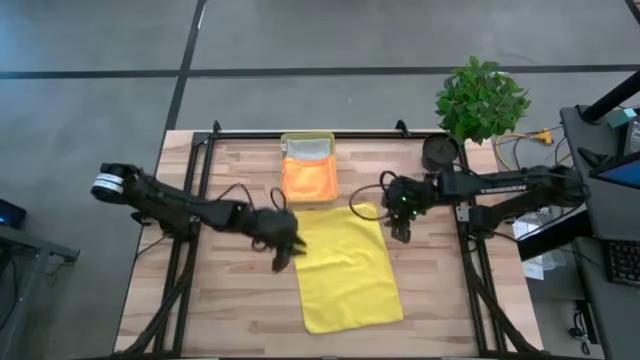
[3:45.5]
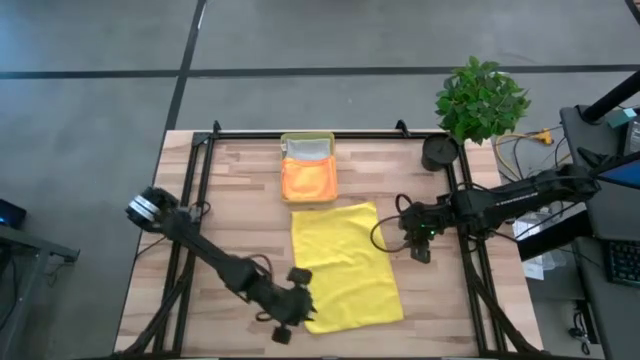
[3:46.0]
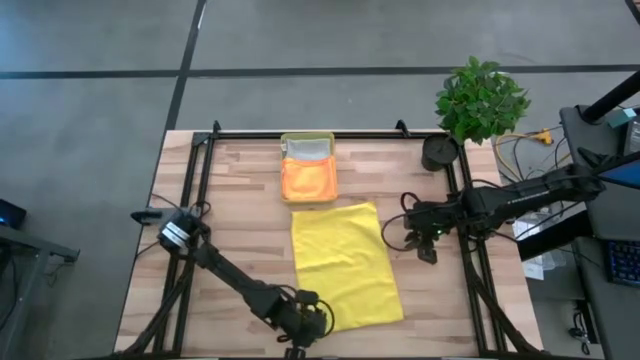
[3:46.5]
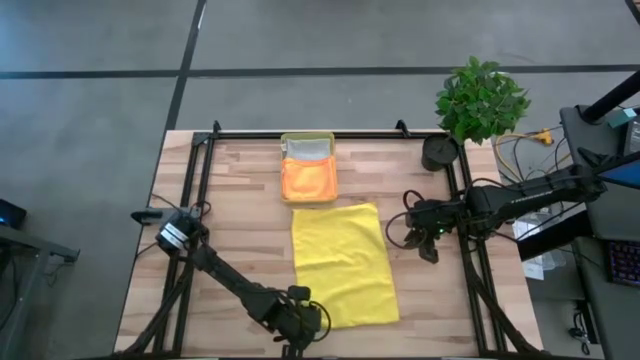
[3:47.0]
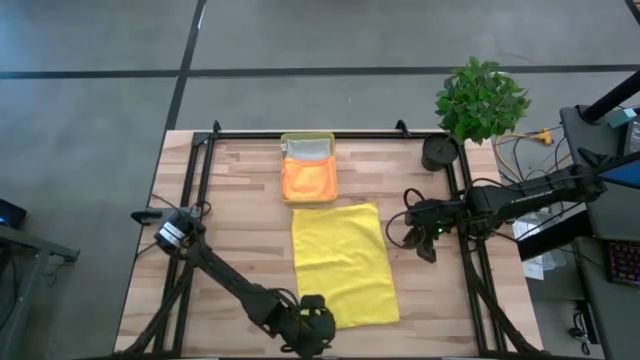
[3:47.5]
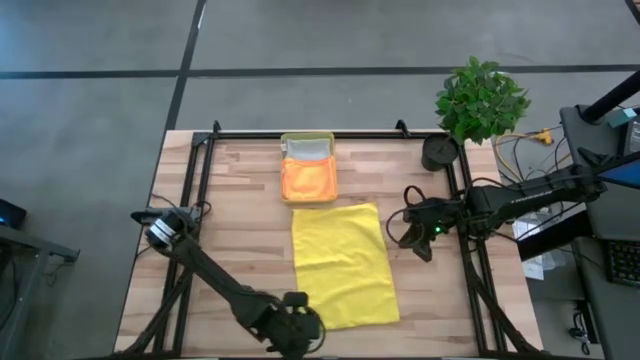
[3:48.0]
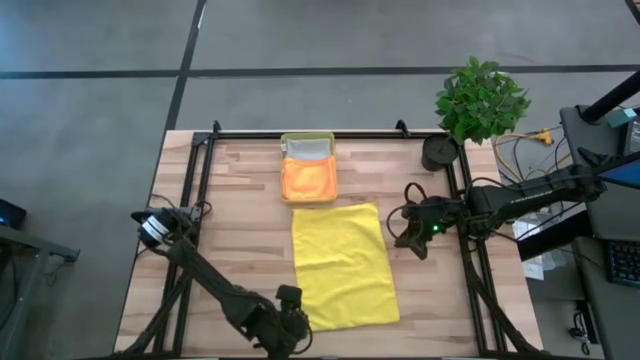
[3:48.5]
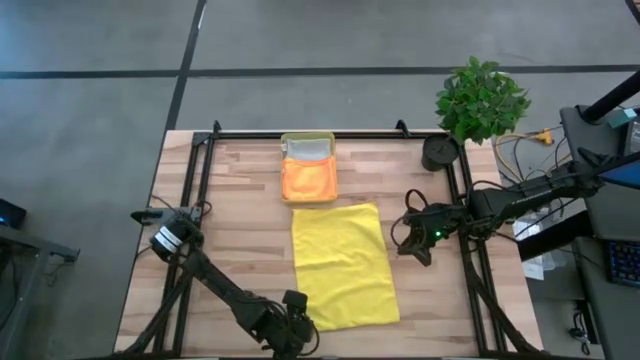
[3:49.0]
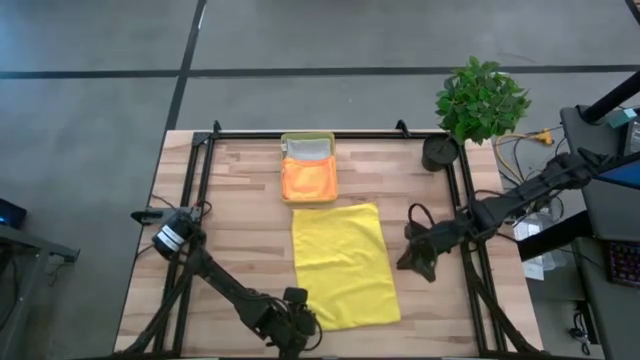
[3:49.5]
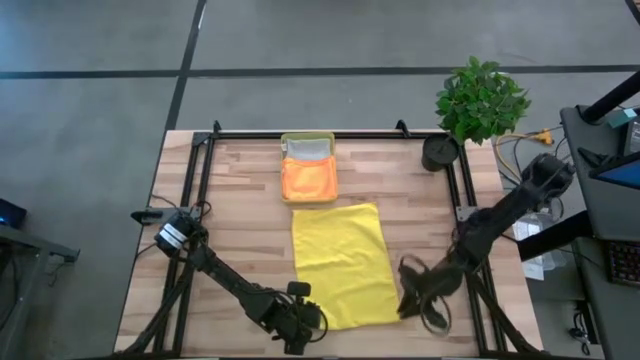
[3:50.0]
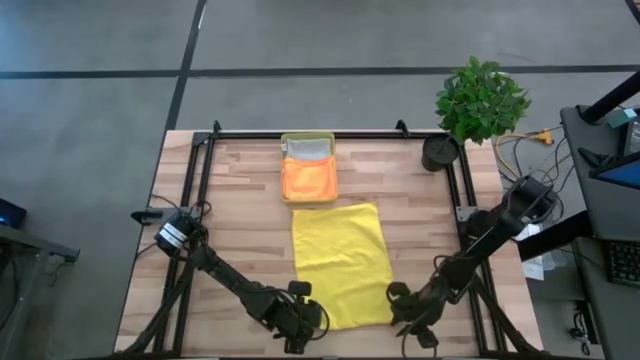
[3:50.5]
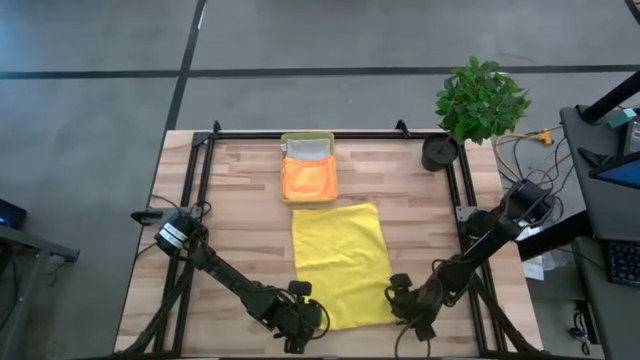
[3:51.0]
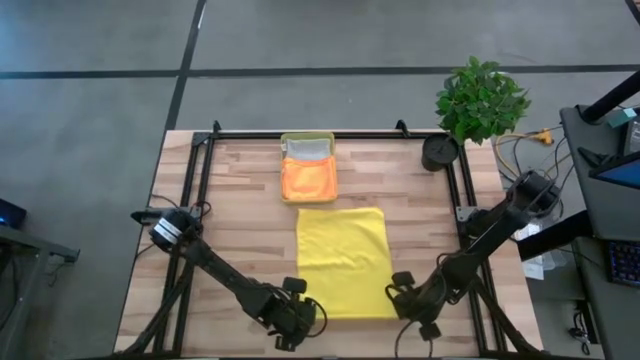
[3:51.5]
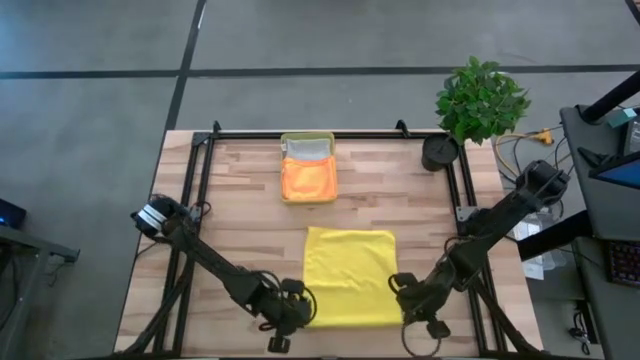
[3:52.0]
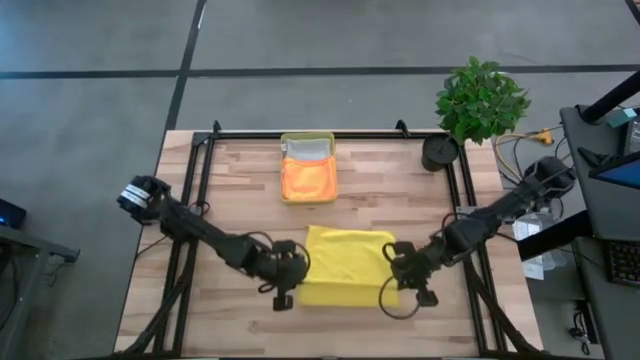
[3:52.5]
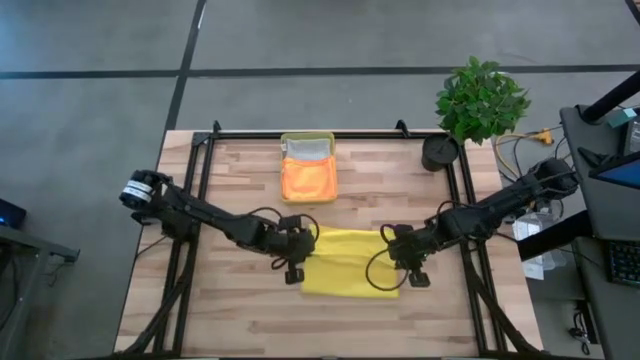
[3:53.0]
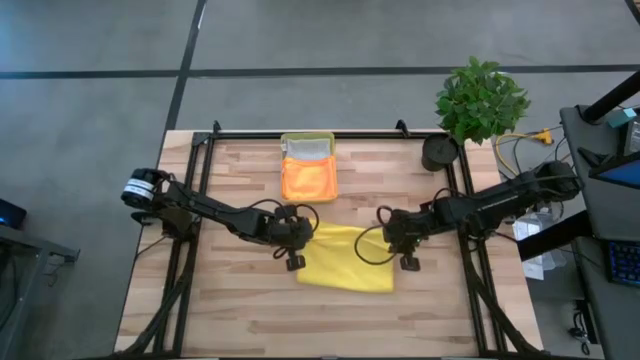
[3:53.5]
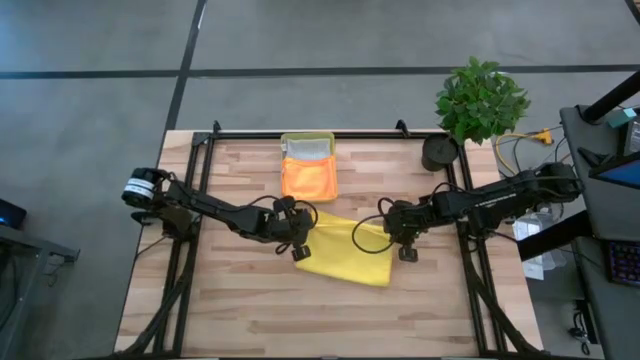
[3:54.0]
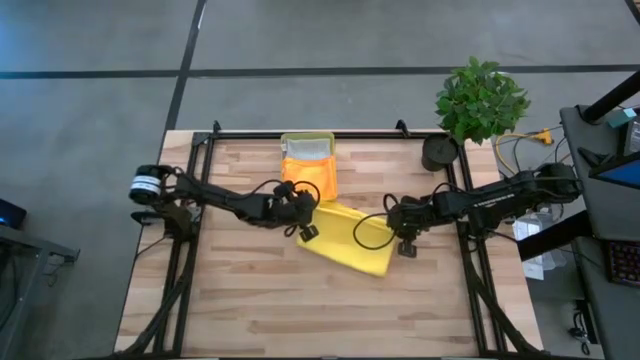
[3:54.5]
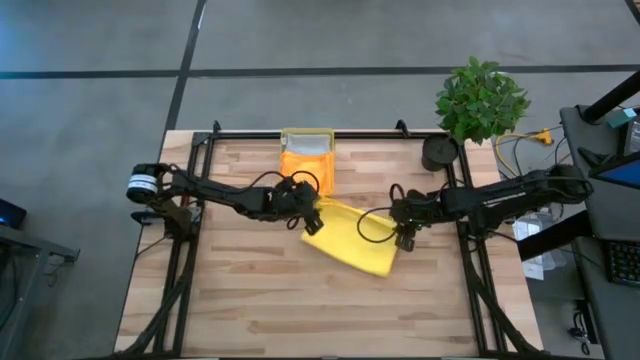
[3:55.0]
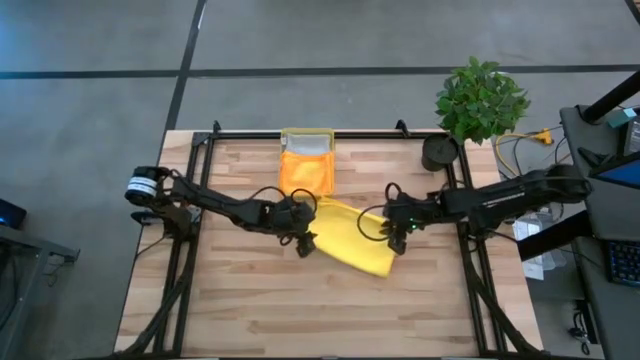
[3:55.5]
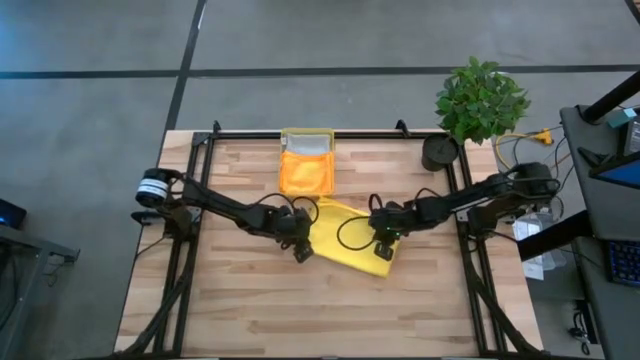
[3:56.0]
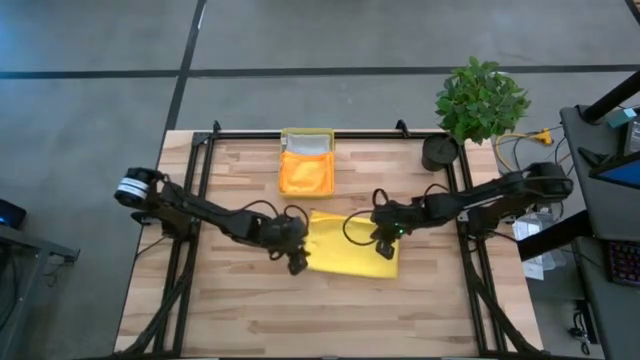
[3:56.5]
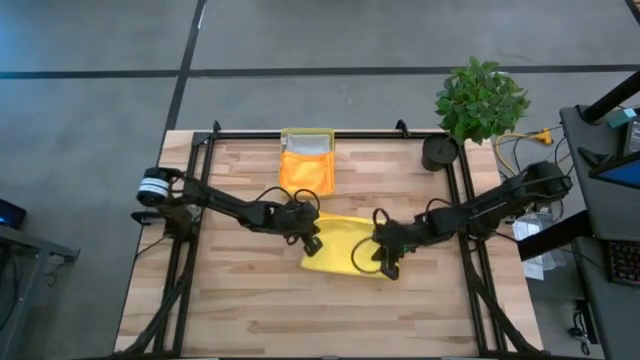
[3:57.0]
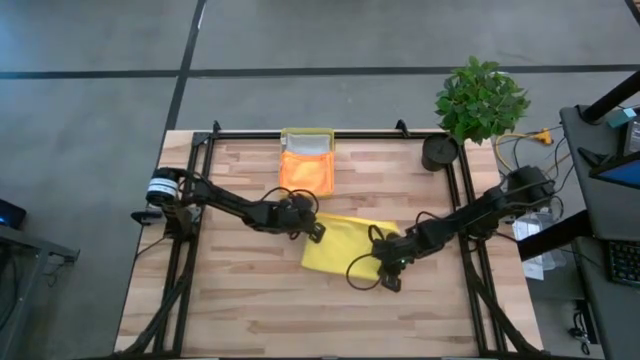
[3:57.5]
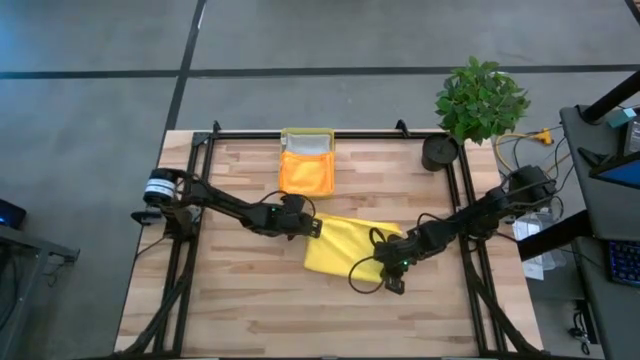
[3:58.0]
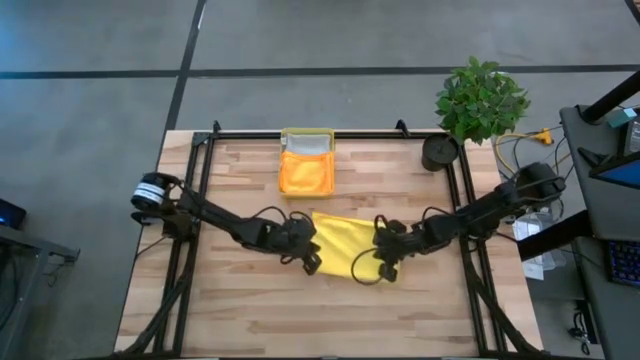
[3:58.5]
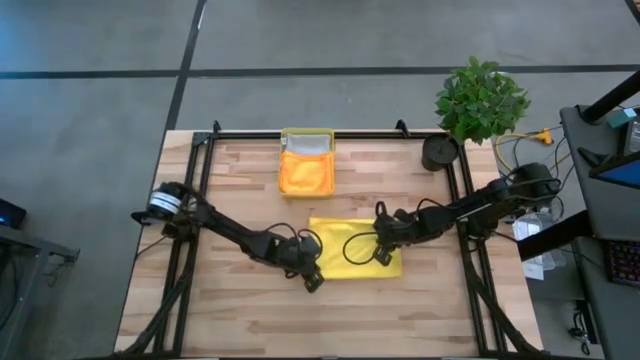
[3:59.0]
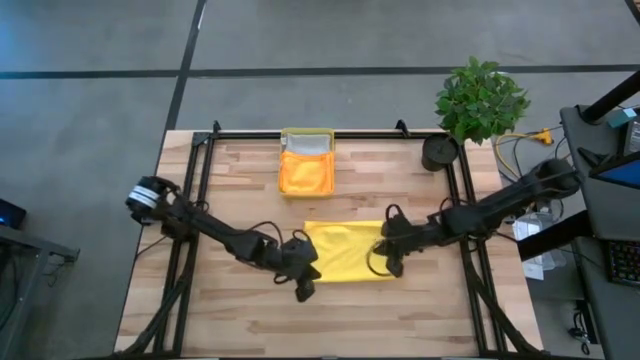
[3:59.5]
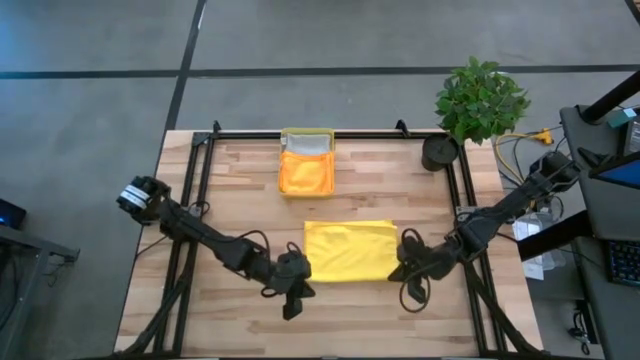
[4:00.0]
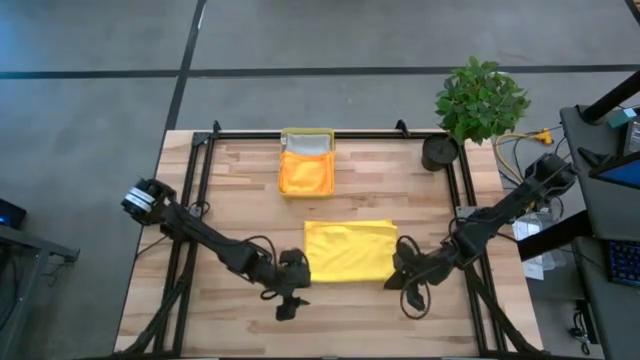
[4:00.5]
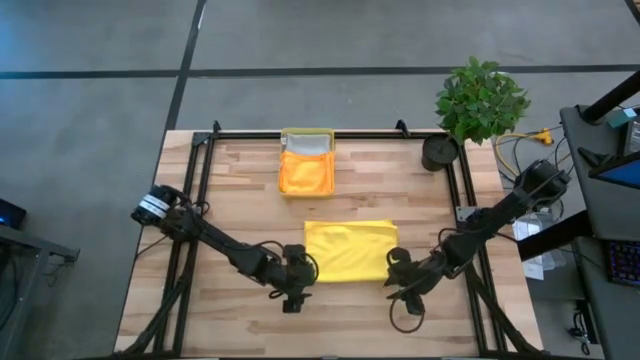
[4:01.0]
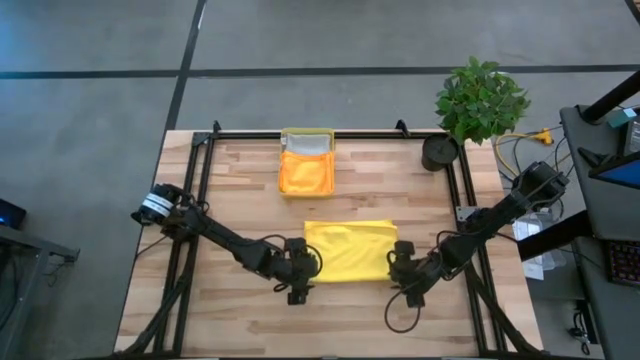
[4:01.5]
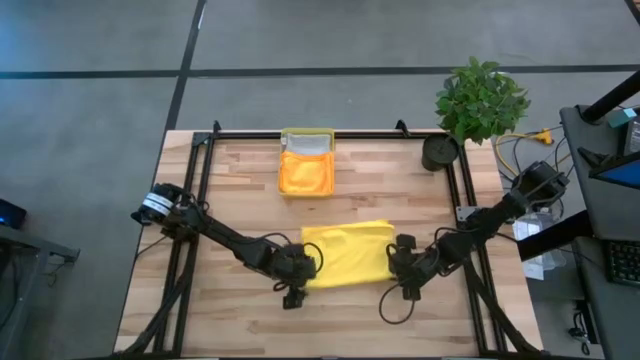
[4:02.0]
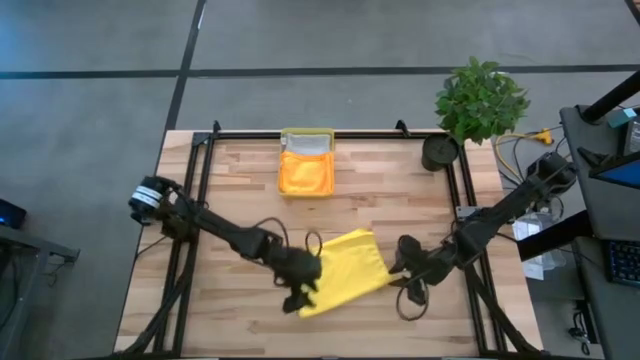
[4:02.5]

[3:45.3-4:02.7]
Task: Fold microfiber towels
Fold the yellow microfiber cloth

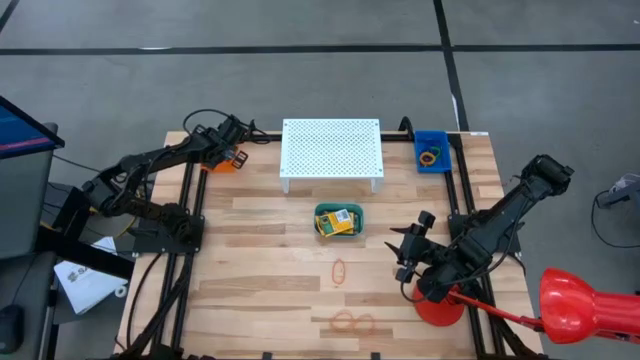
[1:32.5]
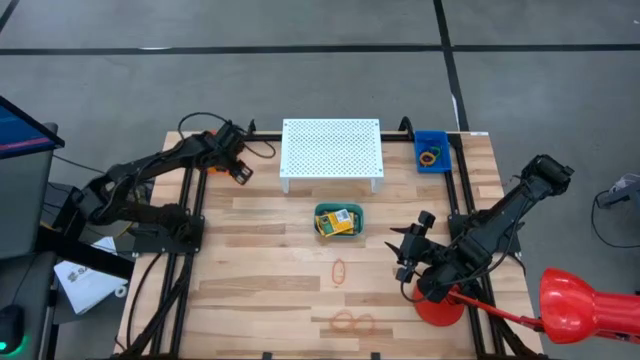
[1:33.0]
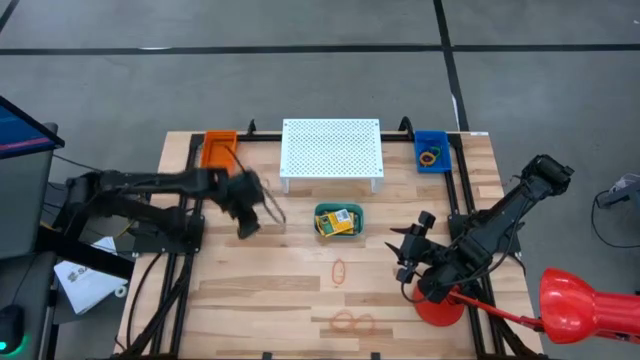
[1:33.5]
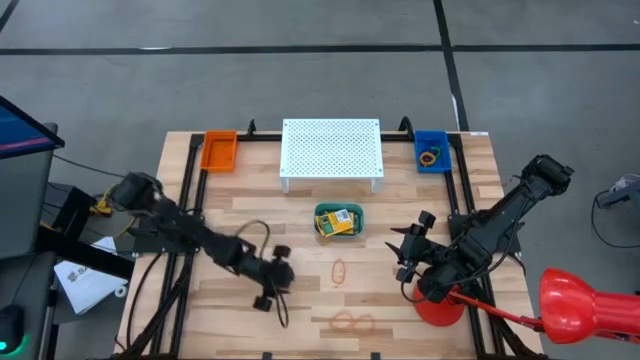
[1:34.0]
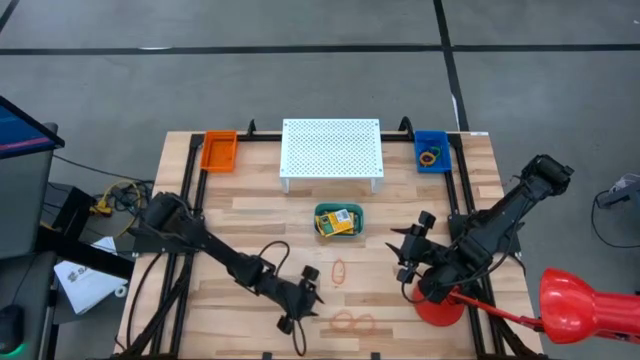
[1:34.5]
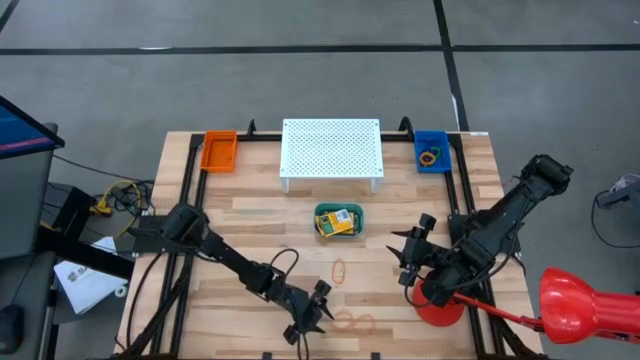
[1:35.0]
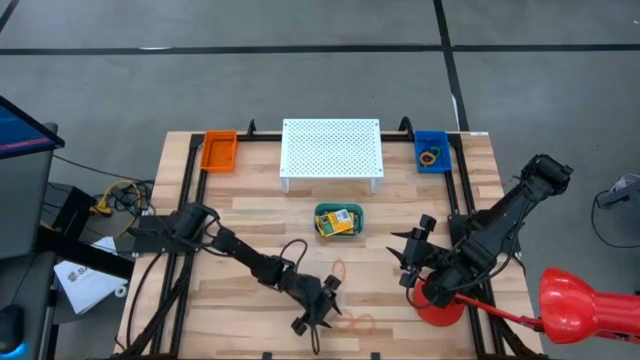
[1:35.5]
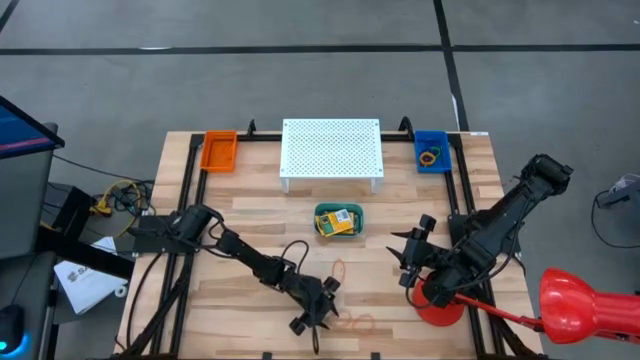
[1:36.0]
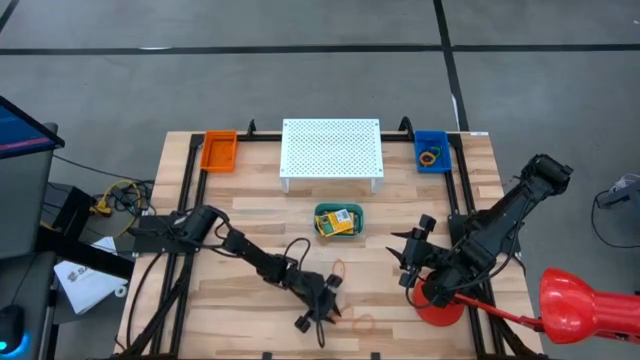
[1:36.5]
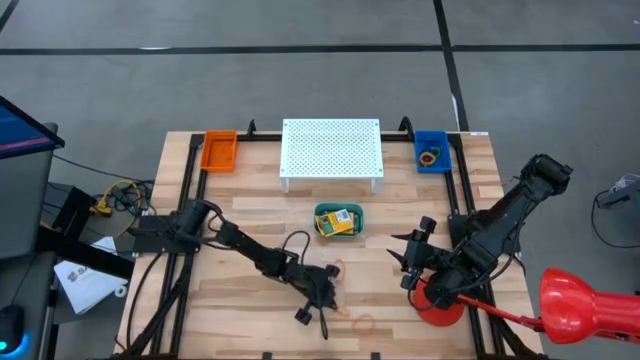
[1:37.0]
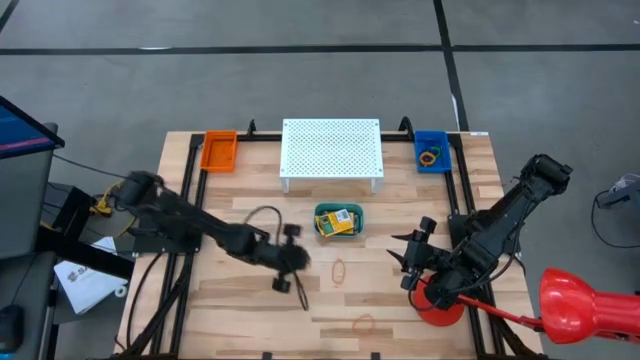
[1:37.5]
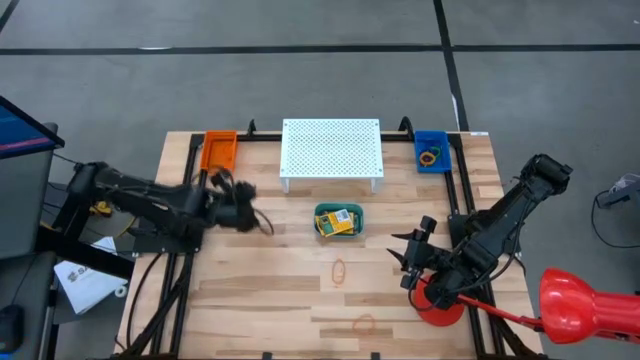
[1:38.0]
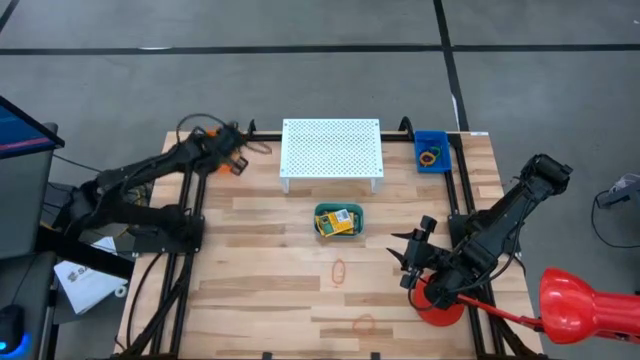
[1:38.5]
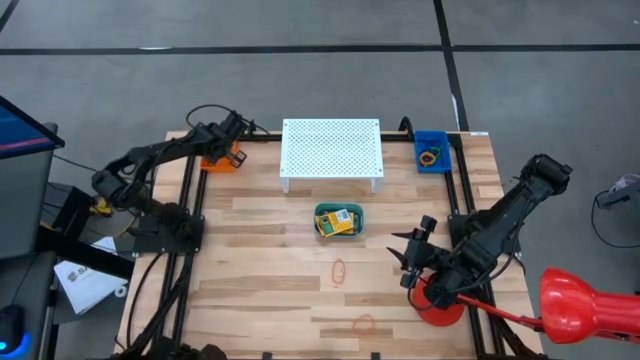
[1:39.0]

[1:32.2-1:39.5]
Task: Pick & Place Office Desk Supplies
Put the orange rubber band into the orange bin
